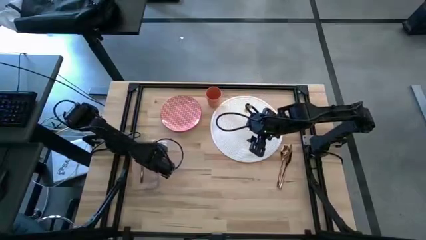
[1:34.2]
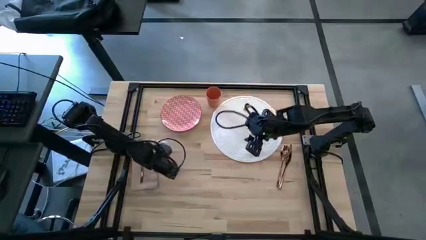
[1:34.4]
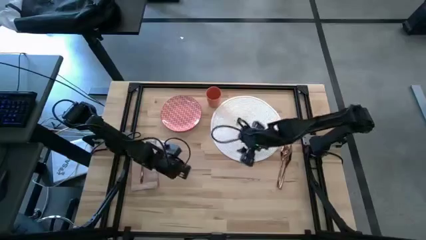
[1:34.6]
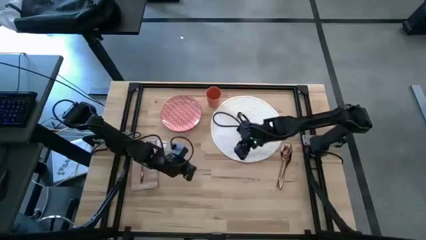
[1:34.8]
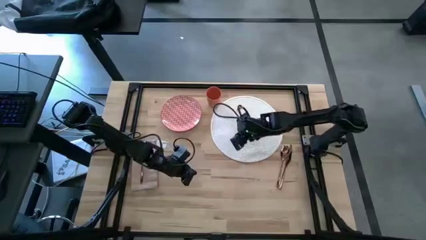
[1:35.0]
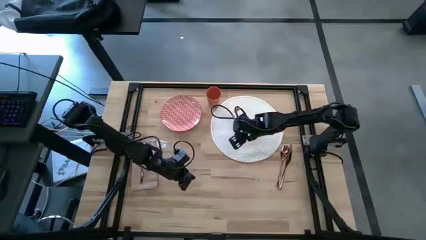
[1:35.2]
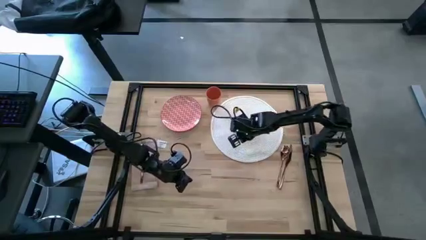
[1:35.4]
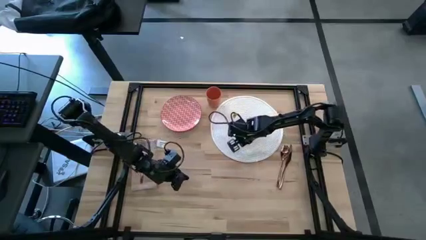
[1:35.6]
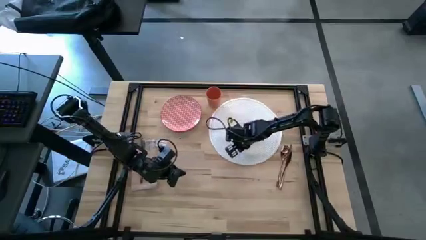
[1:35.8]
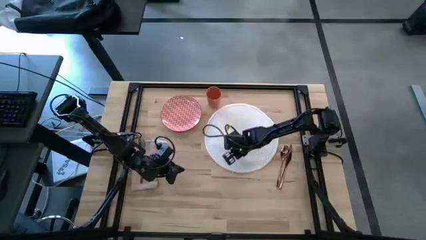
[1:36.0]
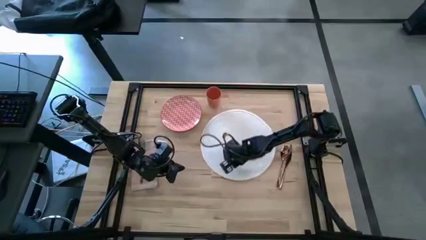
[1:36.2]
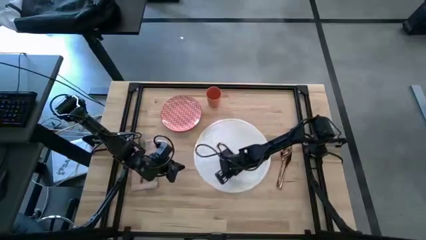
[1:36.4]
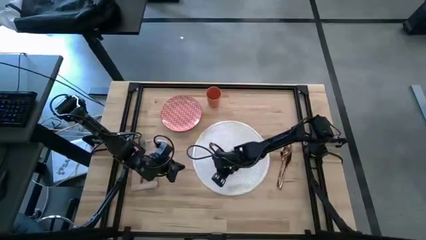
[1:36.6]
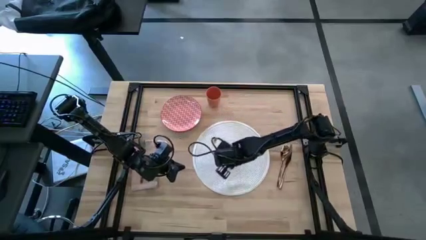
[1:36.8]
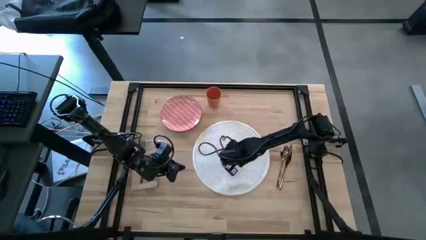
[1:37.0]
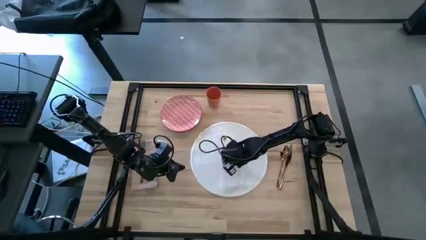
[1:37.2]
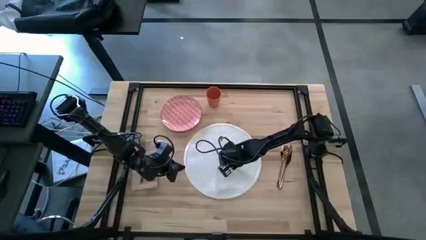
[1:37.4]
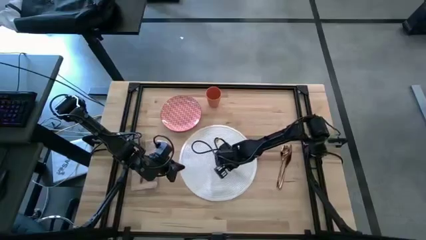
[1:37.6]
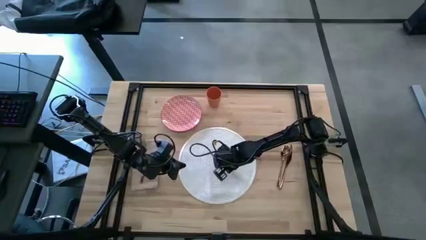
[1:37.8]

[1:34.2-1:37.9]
Task: Set table place
Move the table mat to the center of the table

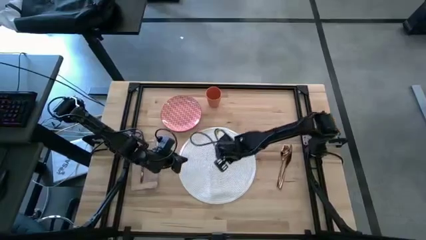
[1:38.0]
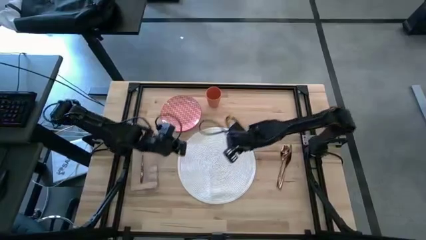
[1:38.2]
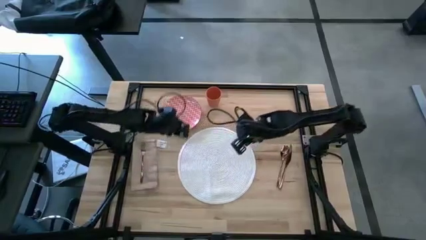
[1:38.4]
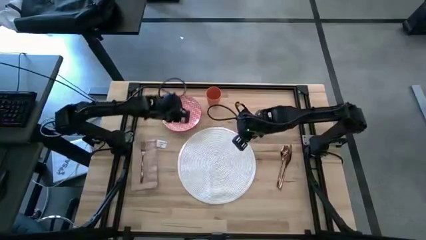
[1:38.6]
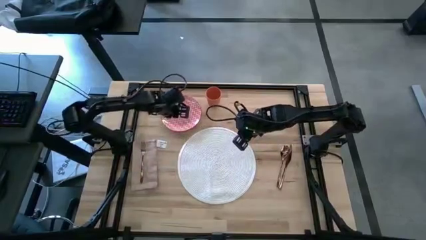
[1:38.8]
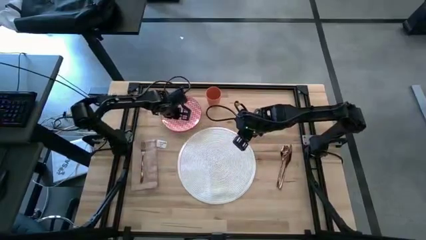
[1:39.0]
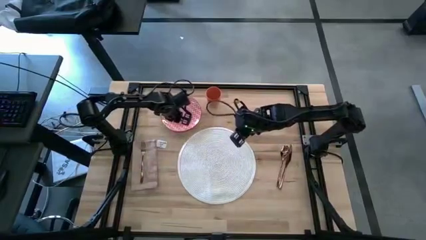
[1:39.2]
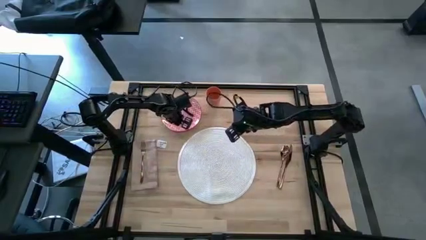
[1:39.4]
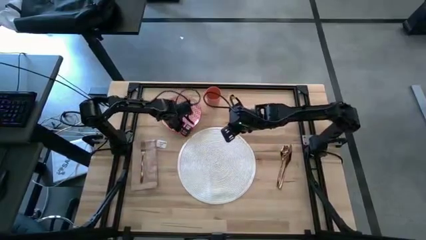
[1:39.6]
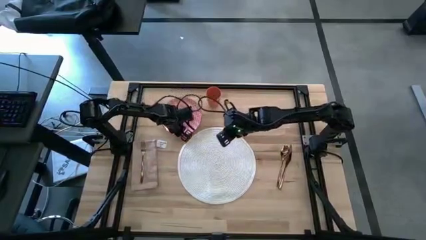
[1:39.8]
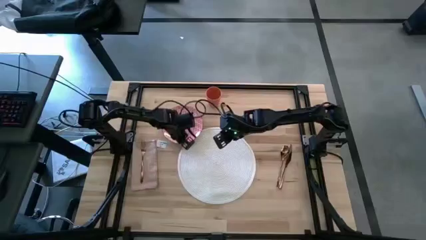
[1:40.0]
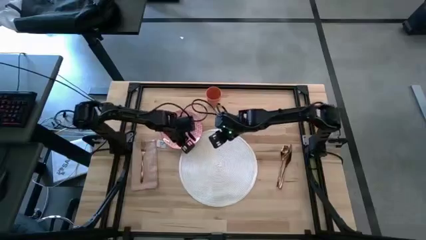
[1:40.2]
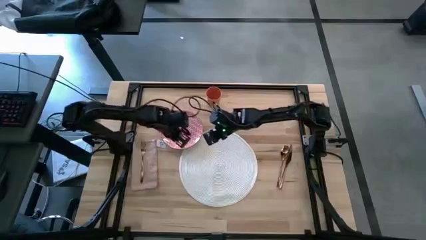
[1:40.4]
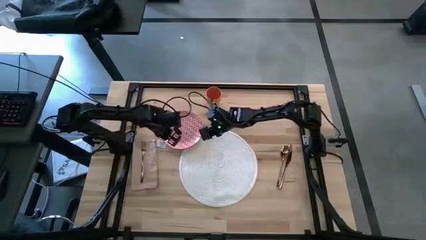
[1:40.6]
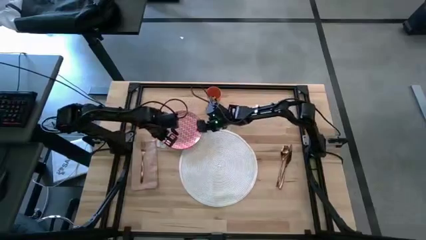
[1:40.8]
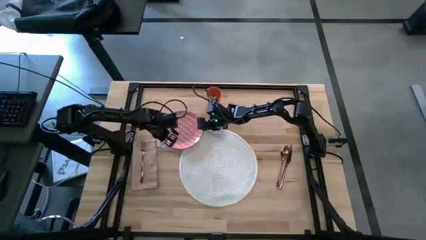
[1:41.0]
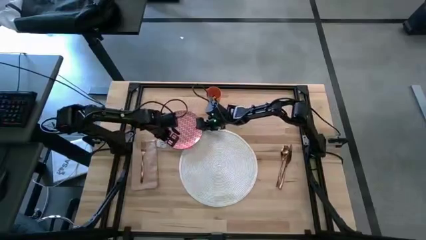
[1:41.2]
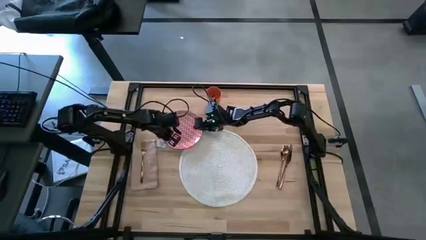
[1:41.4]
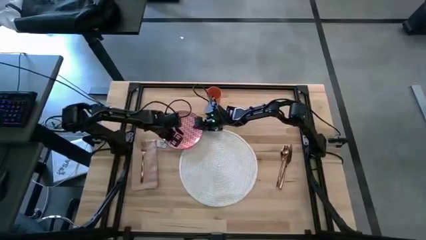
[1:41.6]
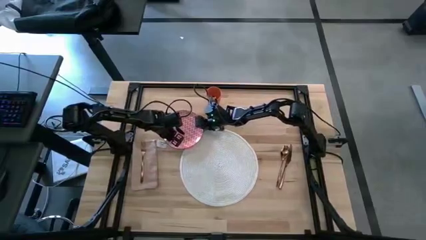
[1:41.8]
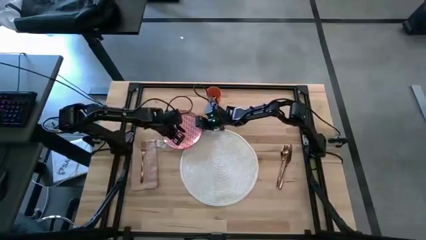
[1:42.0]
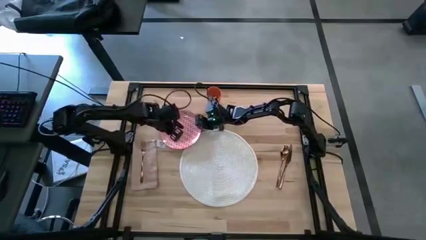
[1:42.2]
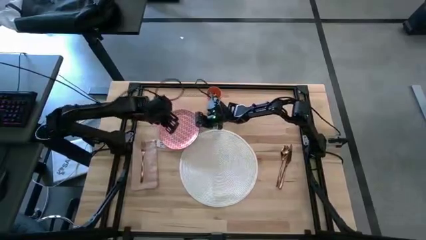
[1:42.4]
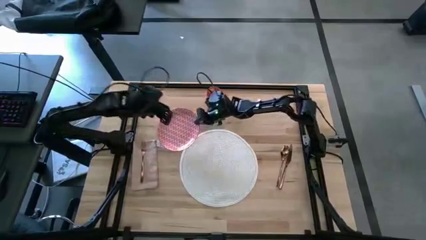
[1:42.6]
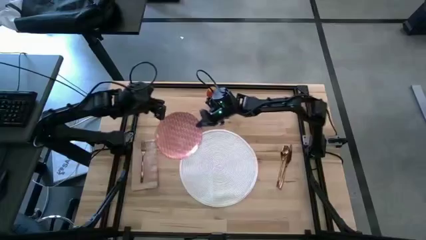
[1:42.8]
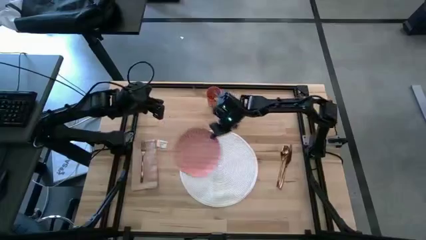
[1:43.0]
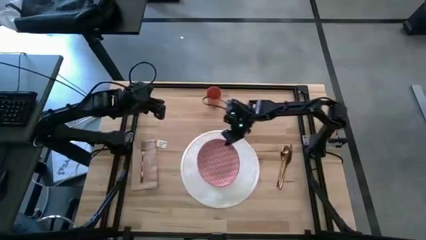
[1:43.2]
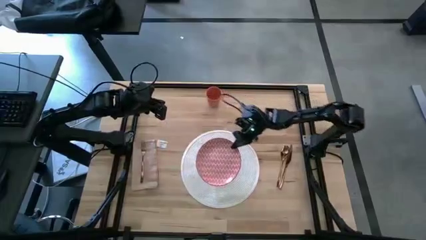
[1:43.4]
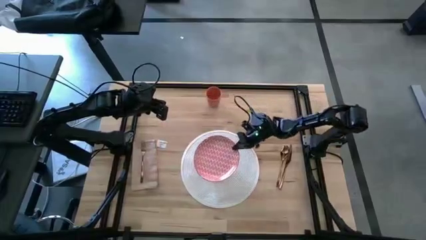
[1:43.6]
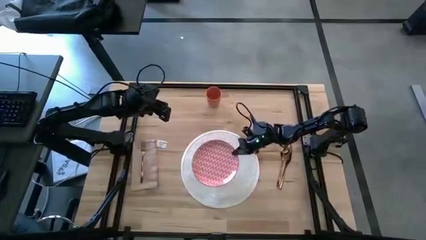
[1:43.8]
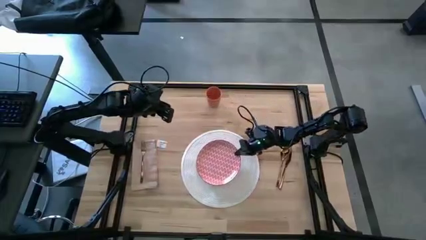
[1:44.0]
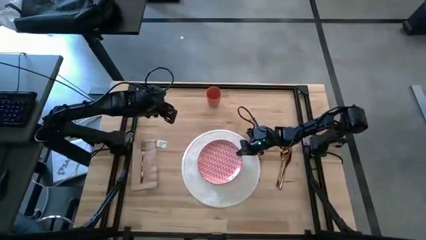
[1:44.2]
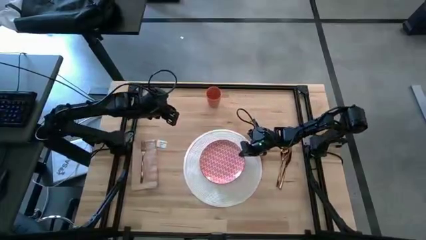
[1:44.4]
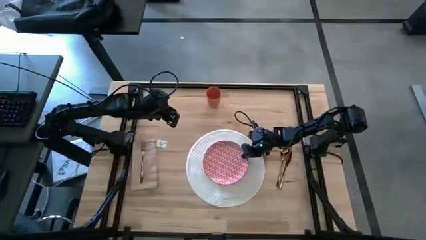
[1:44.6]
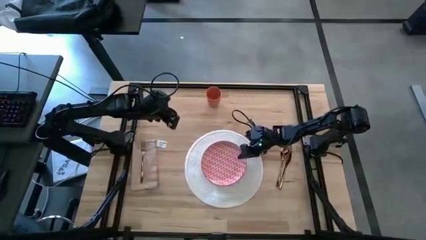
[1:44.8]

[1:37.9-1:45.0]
Put the red pattern plate on the table mat

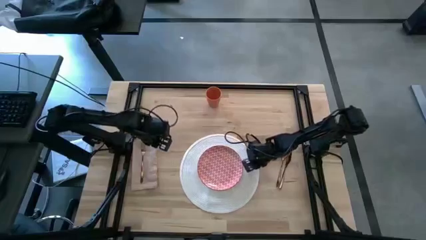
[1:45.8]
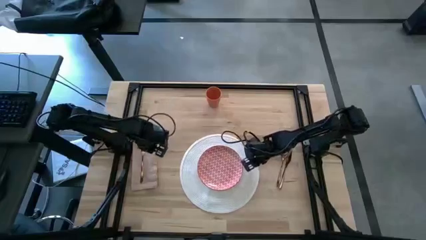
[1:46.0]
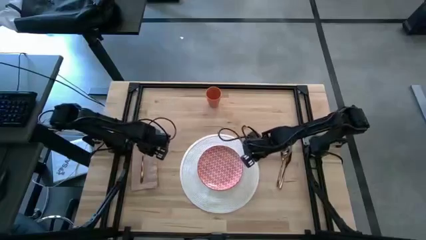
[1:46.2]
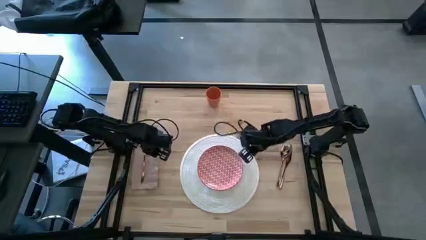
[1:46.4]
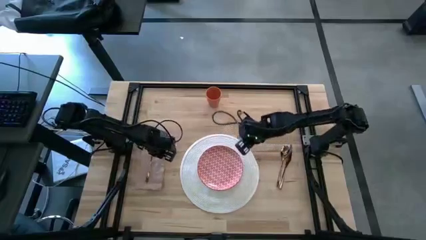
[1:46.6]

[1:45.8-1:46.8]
Adjust the pink napkin

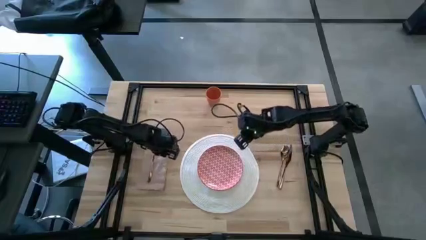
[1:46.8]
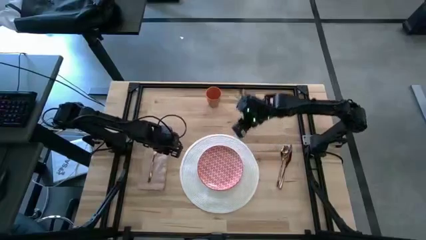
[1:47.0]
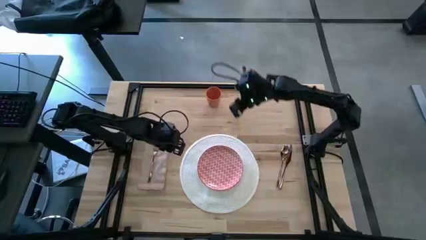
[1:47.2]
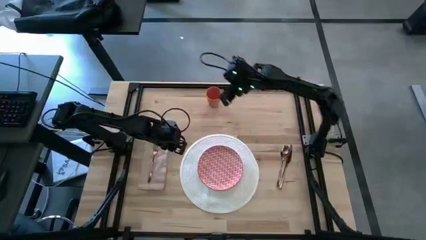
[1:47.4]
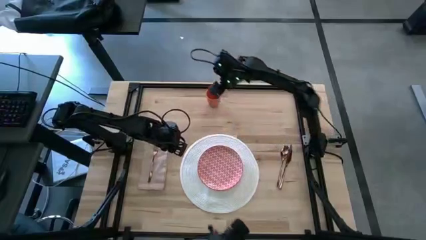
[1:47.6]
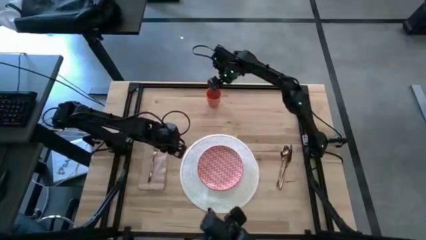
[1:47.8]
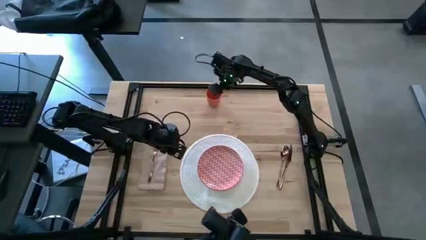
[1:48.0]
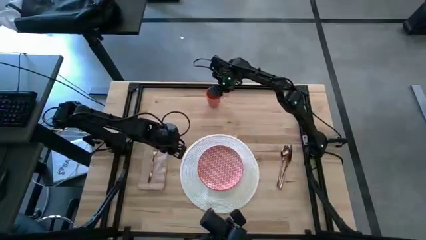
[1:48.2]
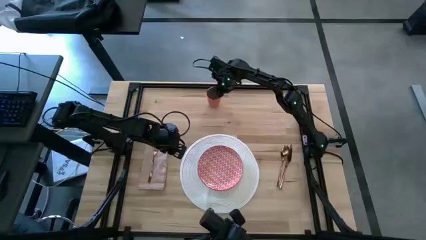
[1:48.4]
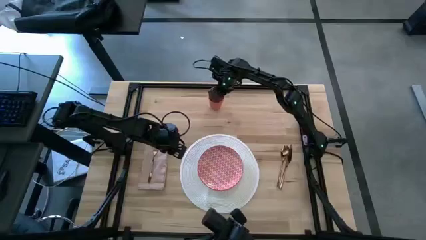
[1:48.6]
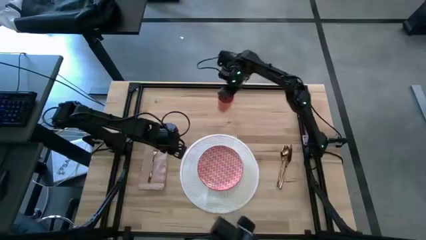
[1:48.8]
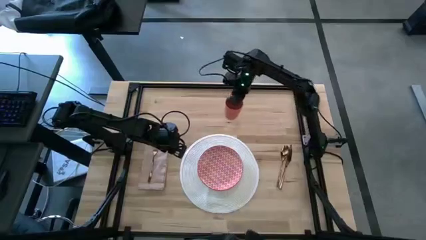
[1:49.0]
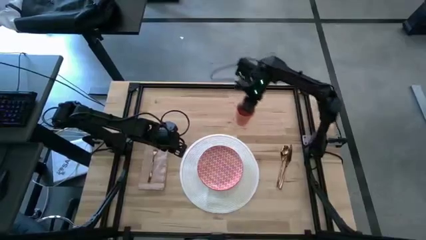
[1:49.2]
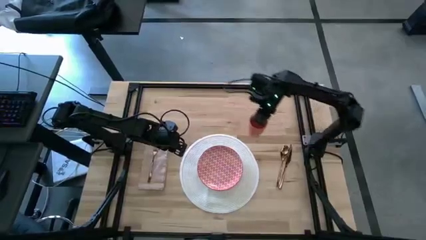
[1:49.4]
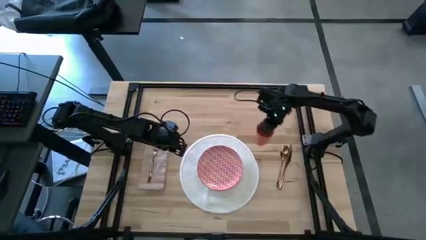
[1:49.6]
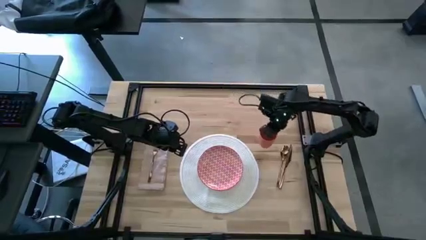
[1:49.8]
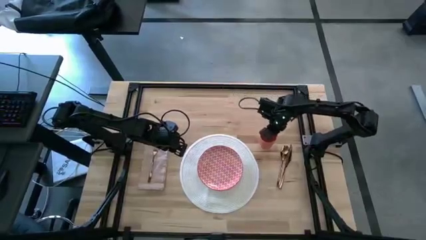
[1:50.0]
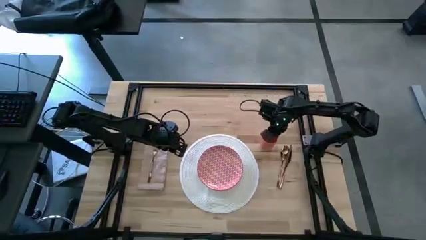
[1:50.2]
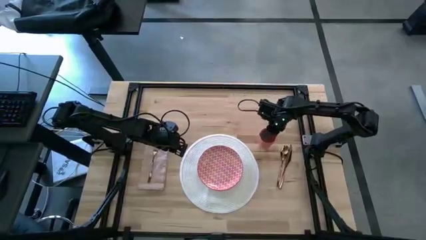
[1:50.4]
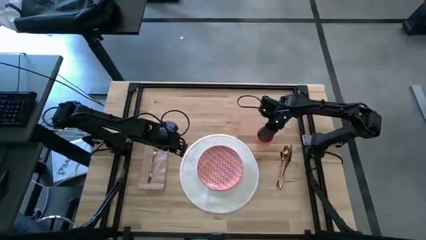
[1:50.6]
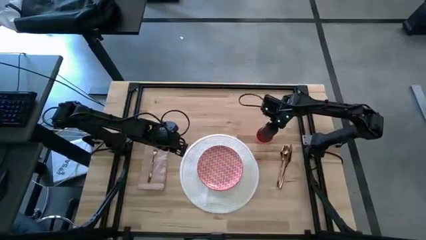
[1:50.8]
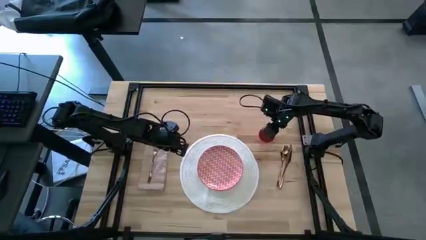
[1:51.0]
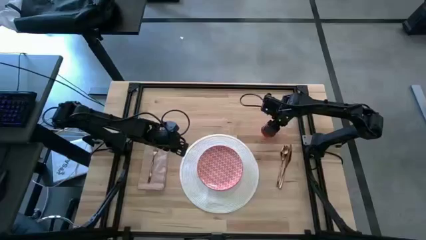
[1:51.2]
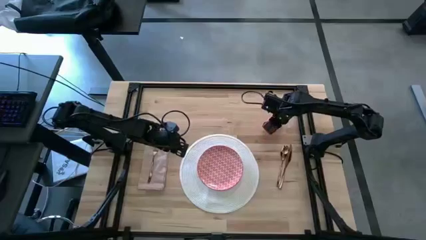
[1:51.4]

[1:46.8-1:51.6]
Put the orange cup in the middle right of the table
